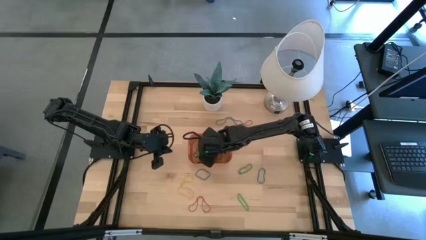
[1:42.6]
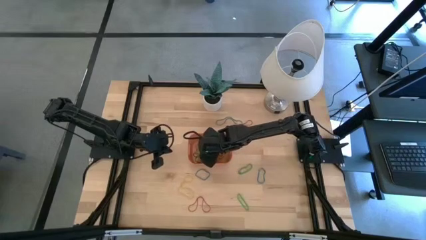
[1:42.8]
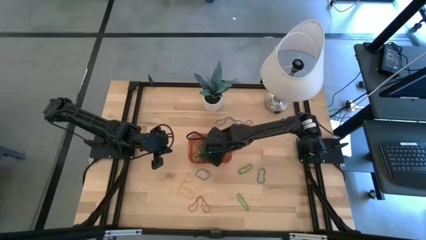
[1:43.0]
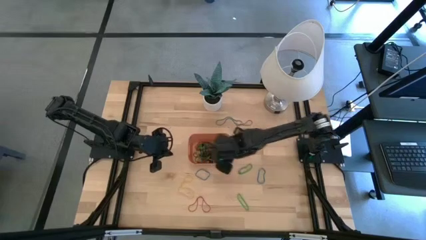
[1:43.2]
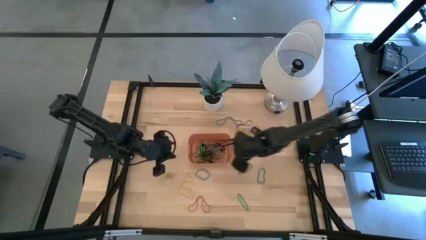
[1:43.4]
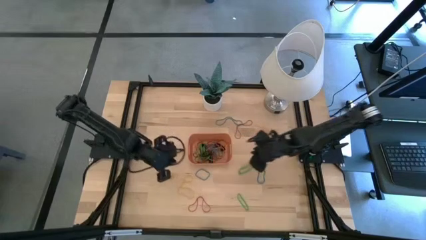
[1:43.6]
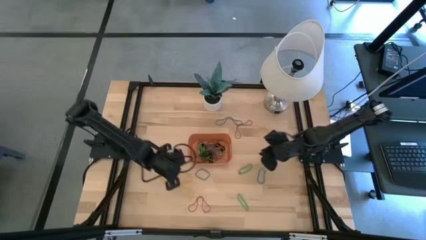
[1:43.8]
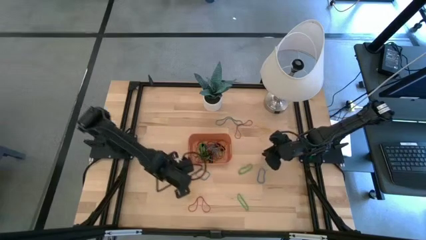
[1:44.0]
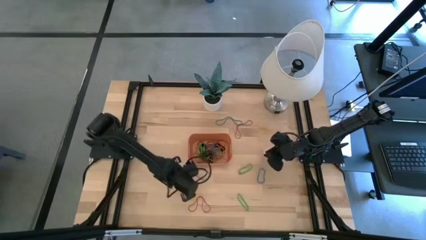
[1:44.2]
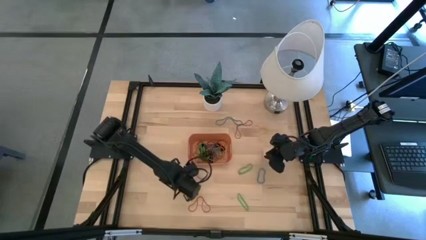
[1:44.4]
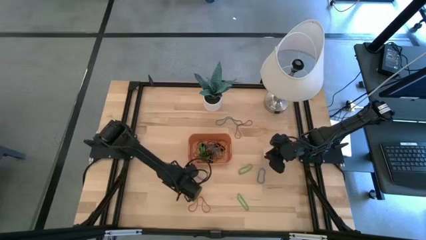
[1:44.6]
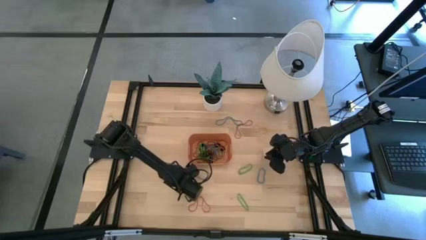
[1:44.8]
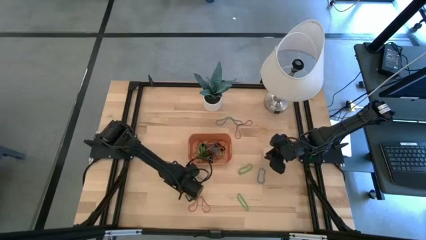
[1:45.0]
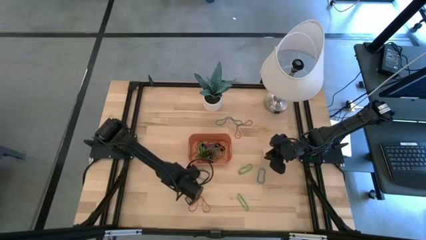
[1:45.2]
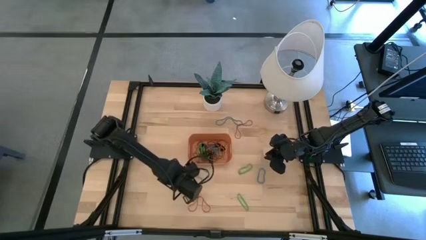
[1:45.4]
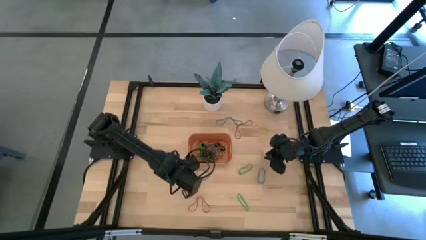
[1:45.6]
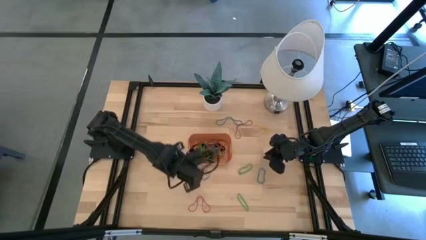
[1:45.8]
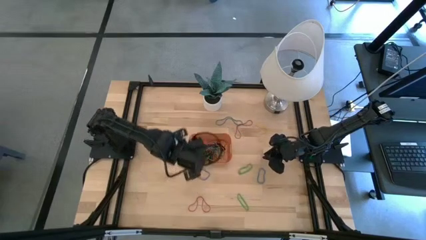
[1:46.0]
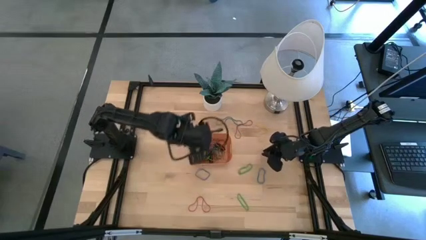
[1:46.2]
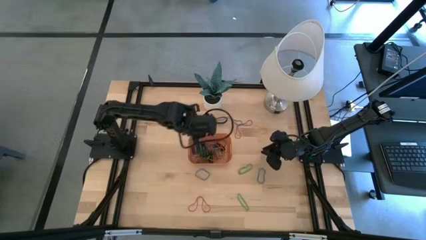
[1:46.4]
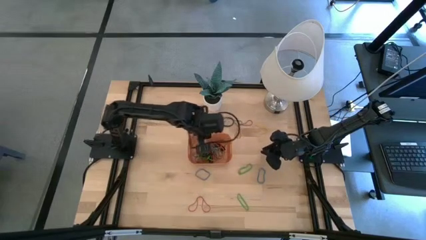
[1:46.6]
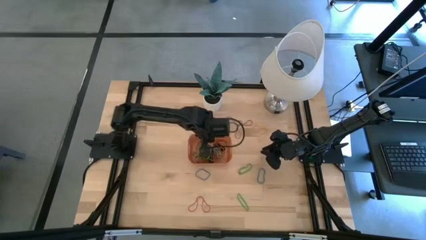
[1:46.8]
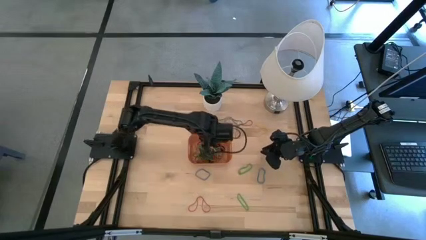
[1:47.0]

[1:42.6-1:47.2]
Task: Pick and place rubber bands into bin
Put the yellow rubber band into the orange bin

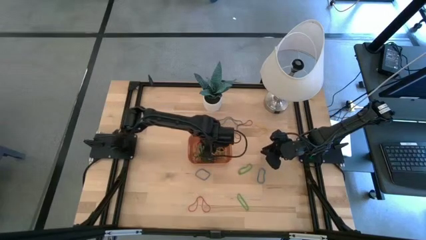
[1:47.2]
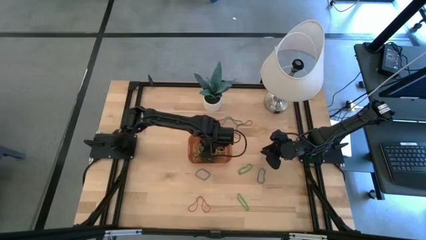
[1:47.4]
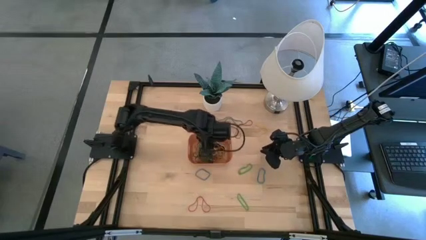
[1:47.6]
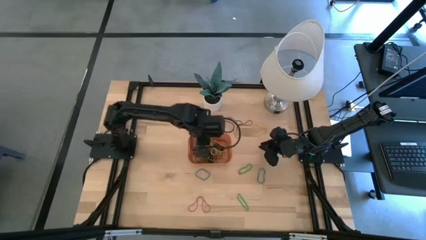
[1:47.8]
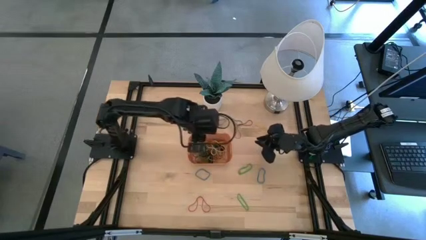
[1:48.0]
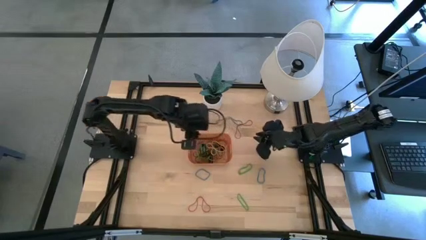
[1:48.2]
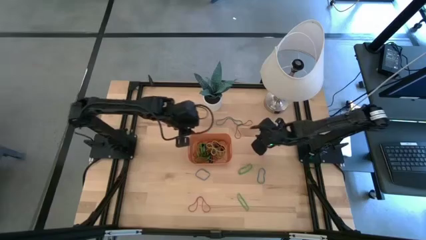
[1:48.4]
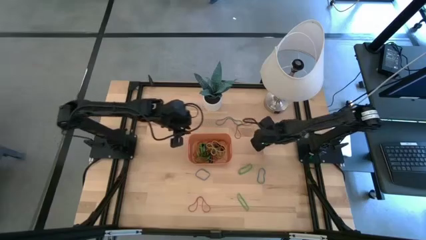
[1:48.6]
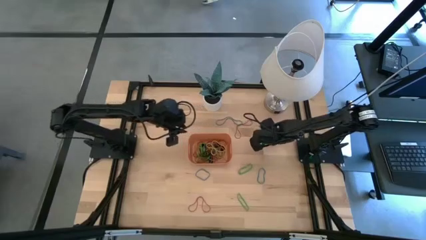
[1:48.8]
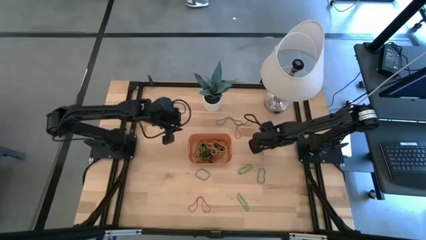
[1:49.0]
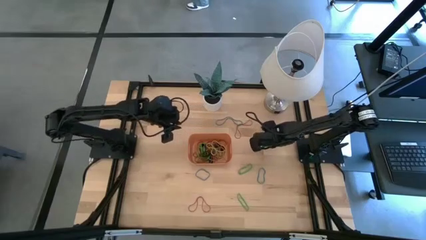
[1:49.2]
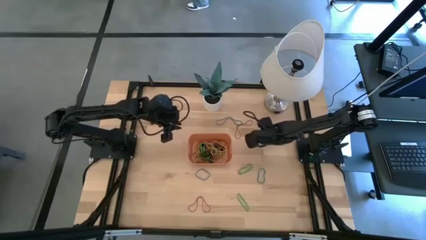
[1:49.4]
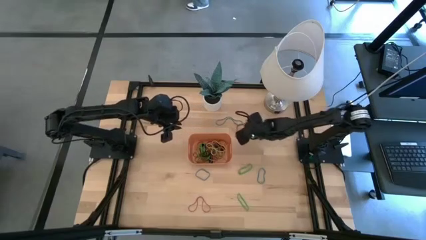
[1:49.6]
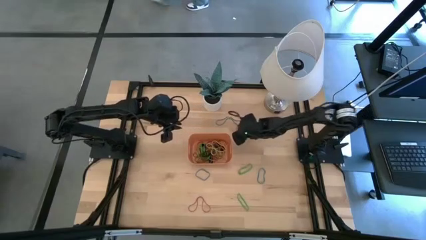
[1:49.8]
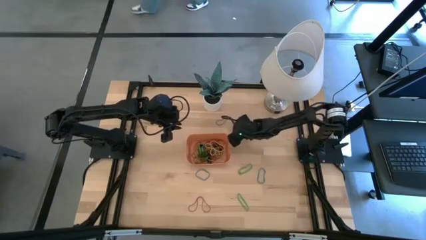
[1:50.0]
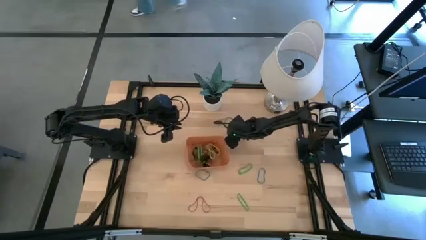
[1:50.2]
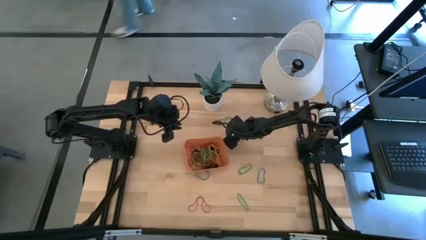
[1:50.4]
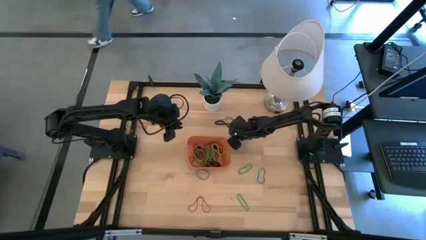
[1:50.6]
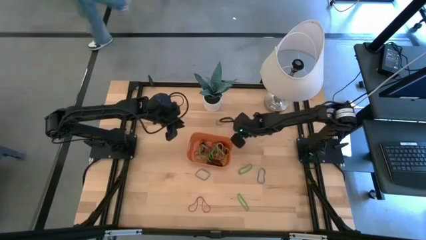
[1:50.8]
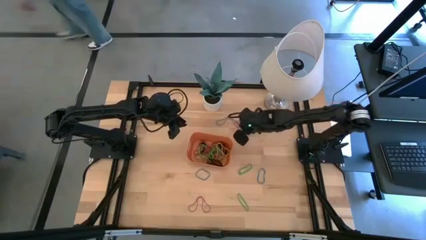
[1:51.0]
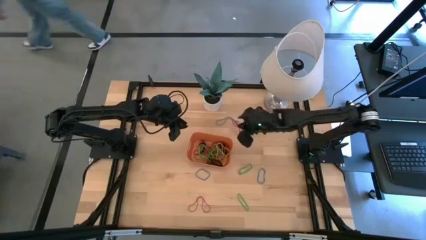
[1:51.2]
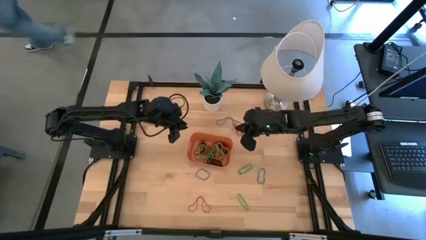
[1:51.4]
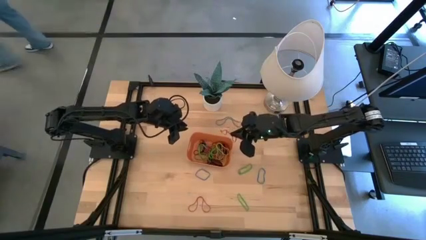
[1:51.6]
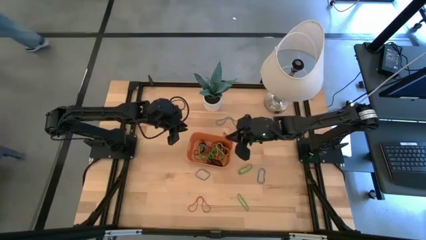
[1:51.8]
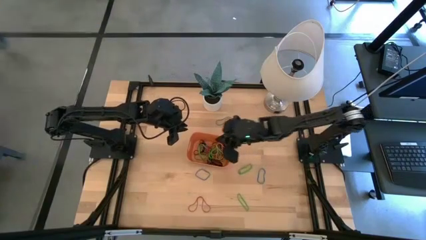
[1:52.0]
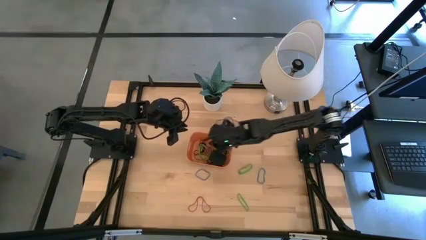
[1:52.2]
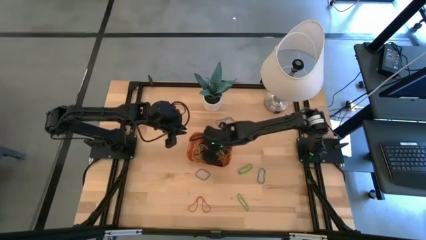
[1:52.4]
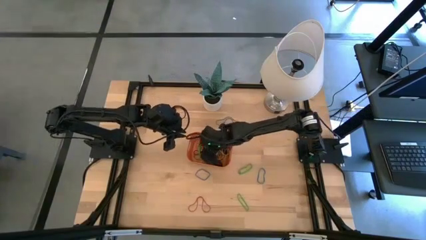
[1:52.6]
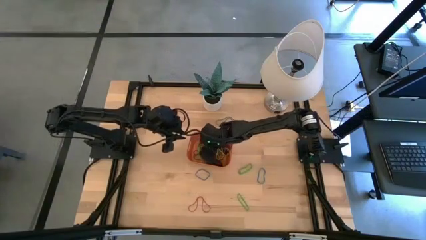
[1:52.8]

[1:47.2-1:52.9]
Put the red rubber band into the orange bin

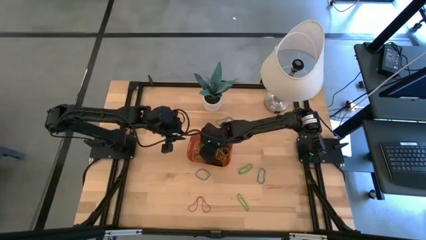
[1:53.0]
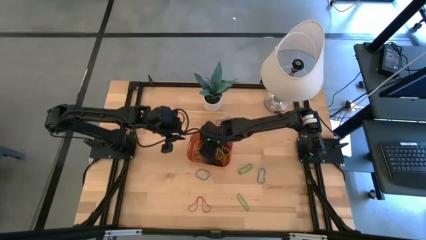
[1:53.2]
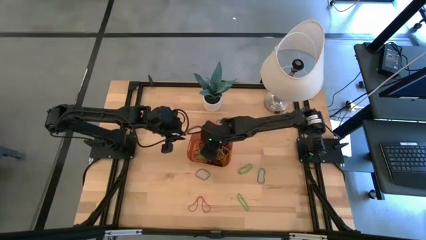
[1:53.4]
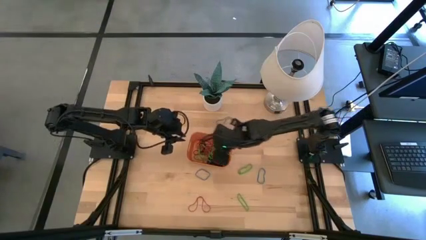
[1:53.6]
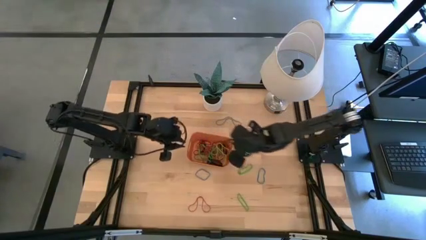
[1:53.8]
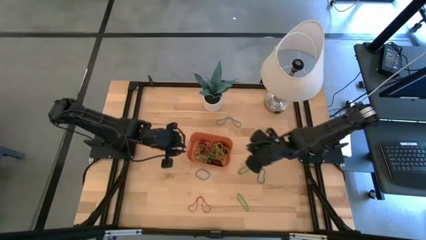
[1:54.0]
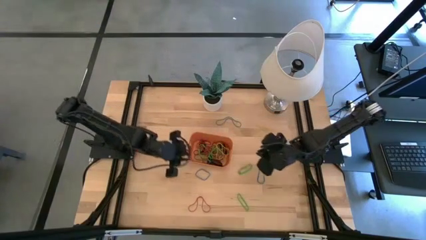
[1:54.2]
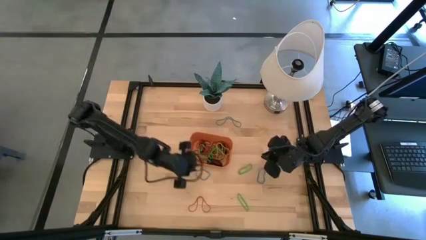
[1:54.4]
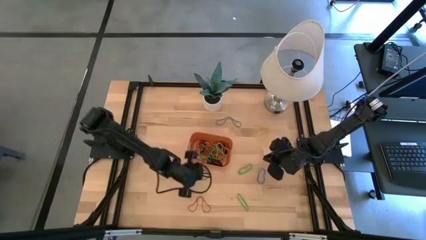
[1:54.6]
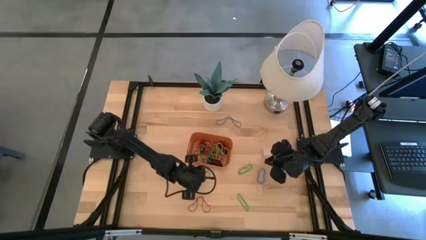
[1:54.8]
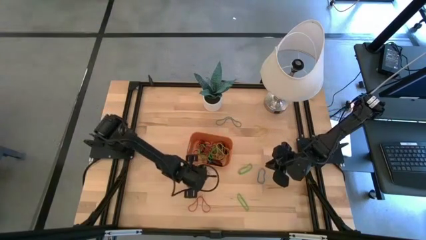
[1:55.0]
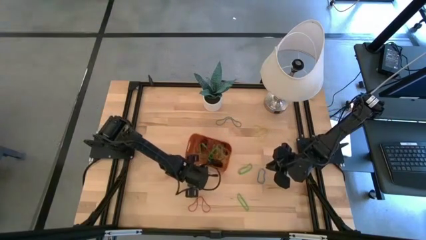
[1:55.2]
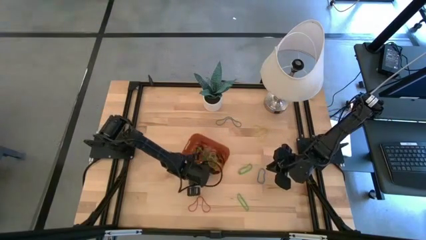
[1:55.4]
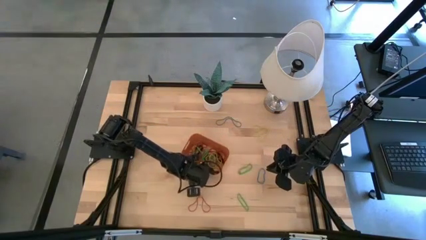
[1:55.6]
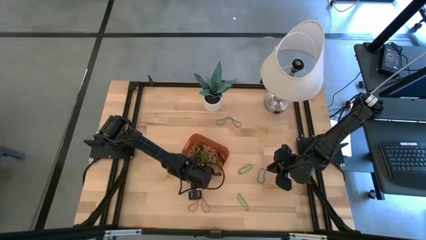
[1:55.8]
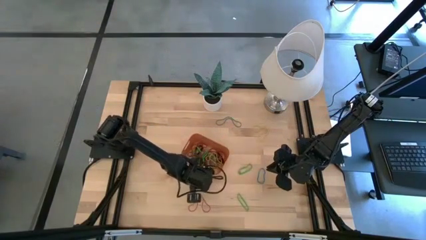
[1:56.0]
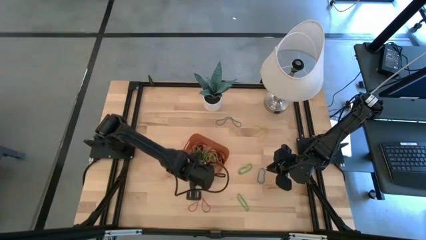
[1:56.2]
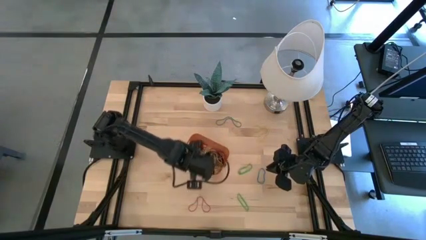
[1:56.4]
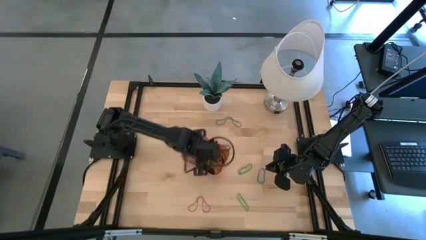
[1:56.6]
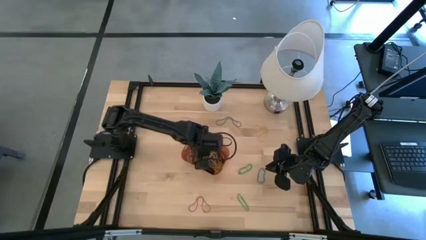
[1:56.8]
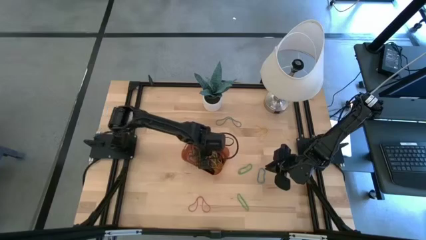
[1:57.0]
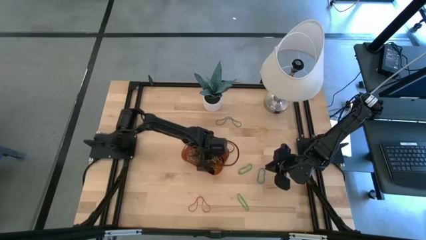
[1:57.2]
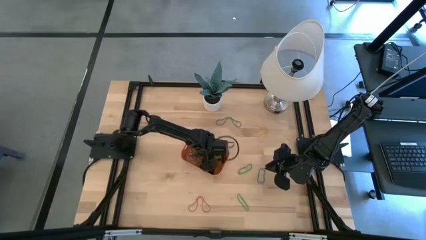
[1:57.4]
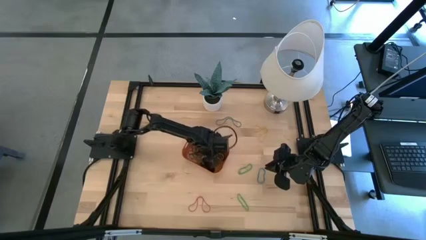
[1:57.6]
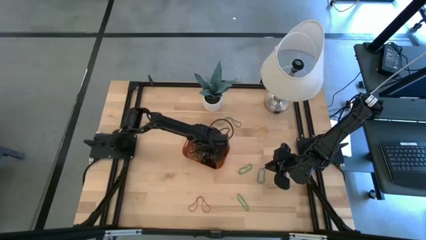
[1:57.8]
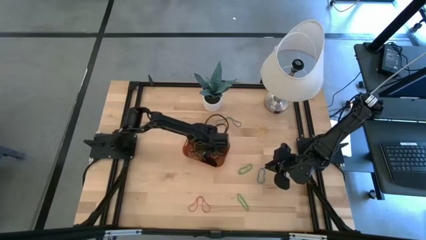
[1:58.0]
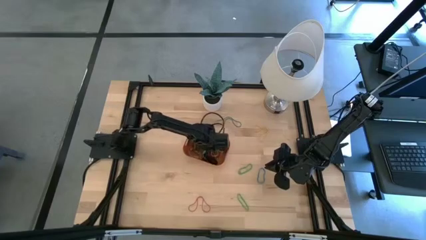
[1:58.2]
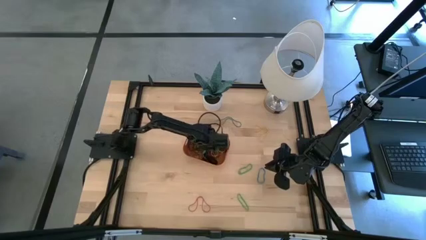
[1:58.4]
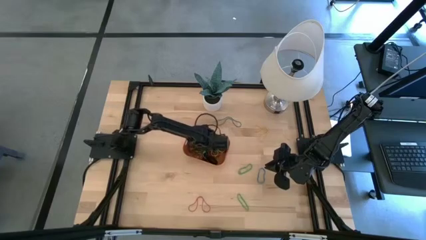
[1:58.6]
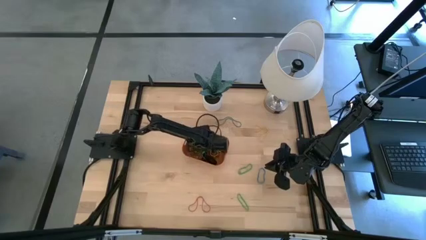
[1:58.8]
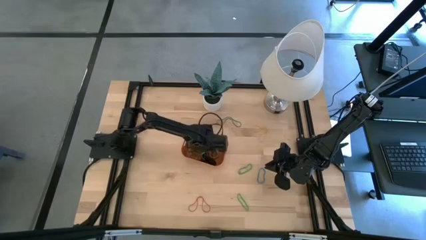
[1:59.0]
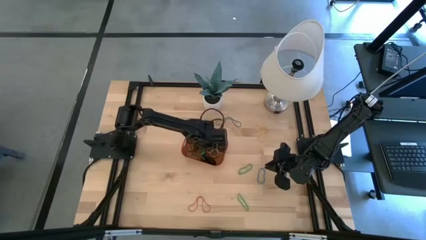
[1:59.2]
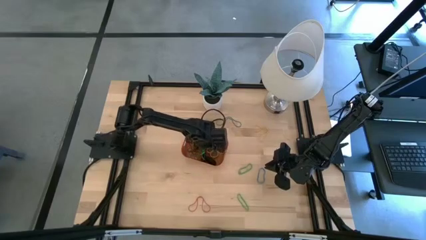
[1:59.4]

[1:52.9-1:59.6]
Put the blue rubber band into the orange bin
